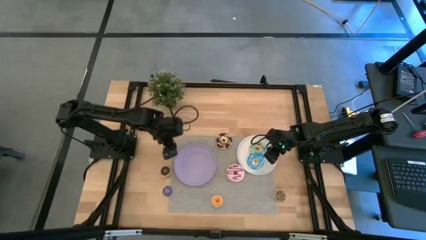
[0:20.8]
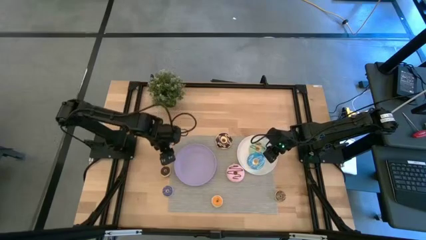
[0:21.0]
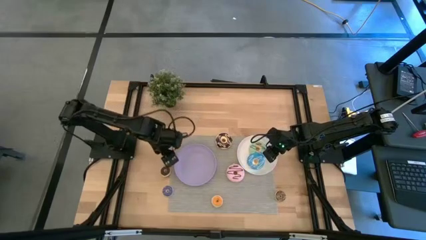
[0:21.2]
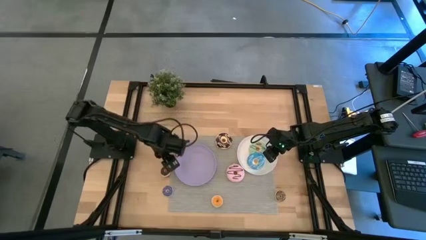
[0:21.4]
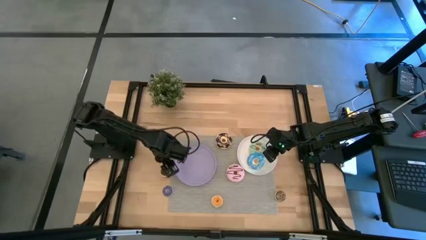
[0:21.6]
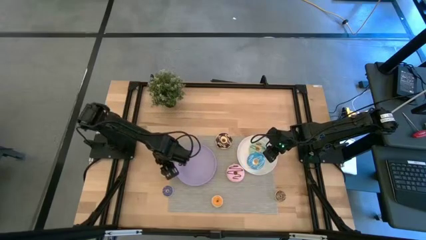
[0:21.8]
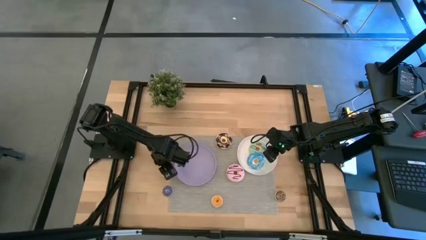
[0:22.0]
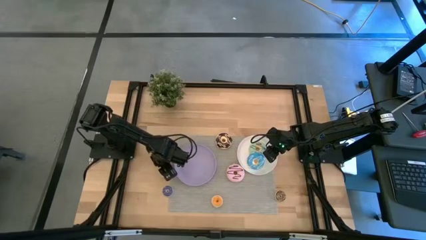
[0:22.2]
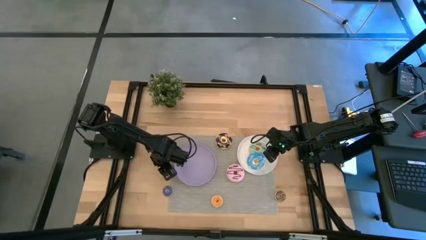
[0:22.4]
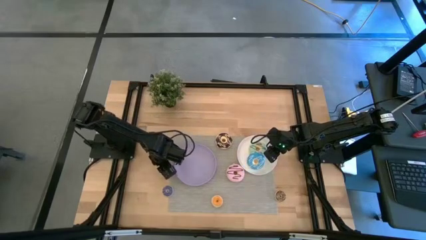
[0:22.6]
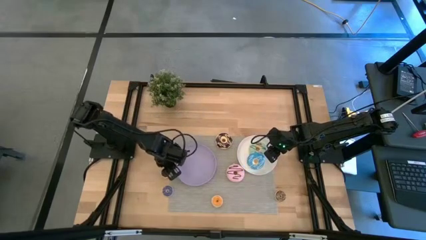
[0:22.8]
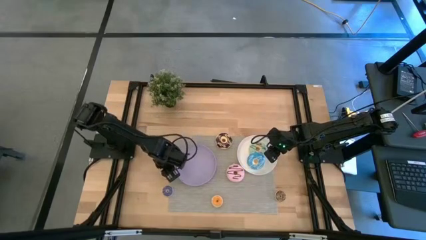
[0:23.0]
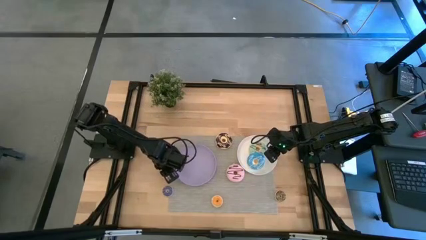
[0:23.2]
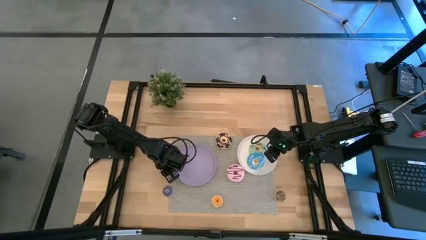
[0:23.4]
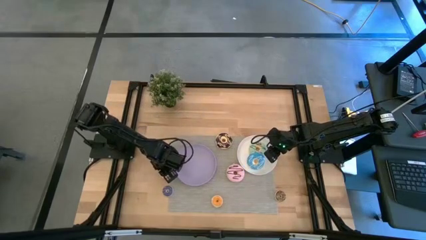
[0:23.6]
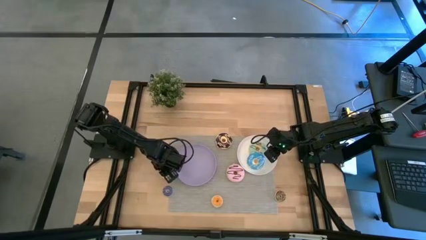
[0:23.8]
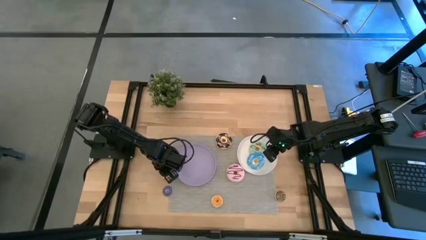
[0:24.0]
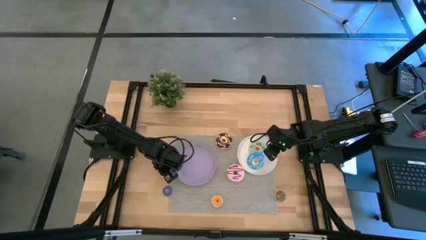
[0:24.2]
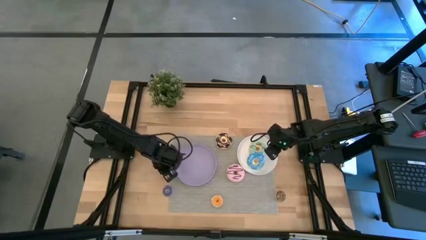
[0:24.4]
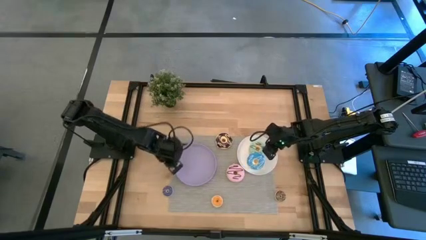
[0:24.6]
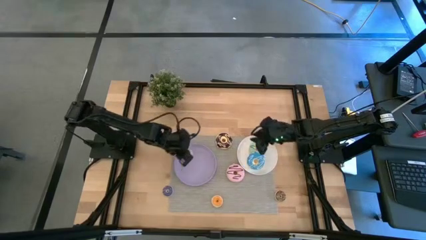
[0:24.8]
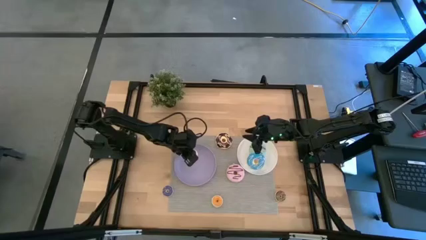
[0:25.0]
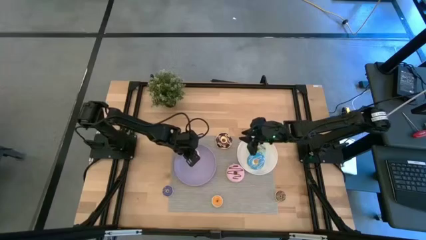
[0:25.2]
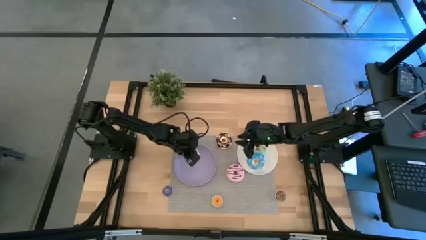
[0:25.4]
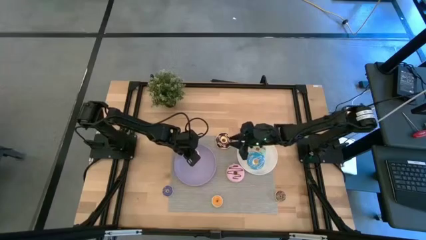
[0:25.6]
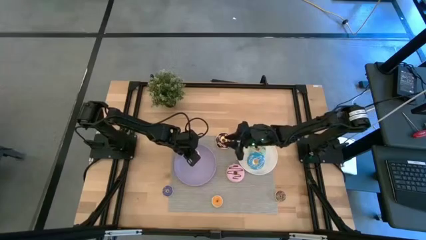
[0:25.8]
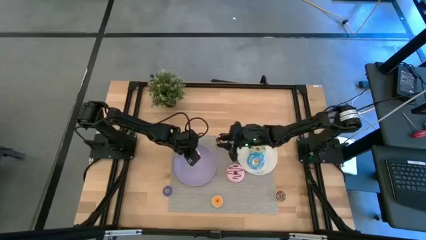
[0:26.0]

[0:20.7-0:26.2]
Task: Pick & Place donuts
Put the small dark brown donut on the purple plate

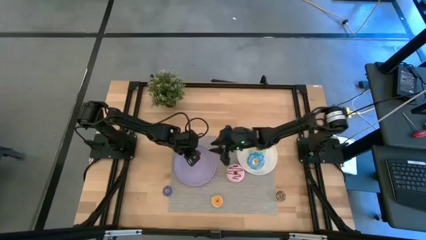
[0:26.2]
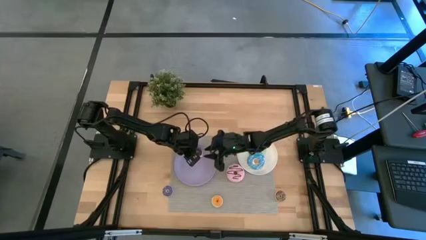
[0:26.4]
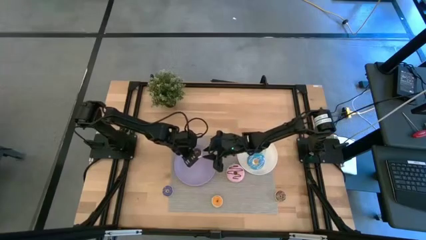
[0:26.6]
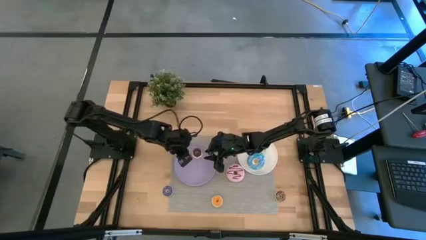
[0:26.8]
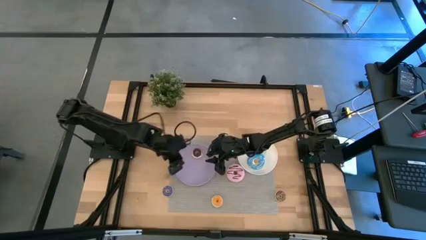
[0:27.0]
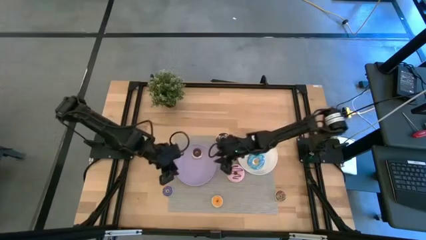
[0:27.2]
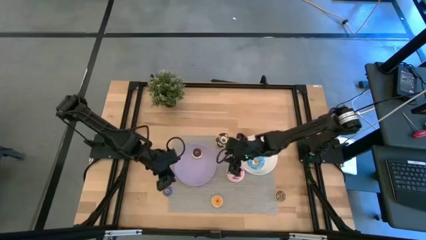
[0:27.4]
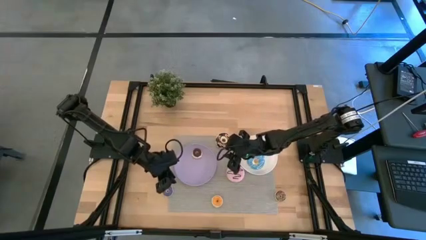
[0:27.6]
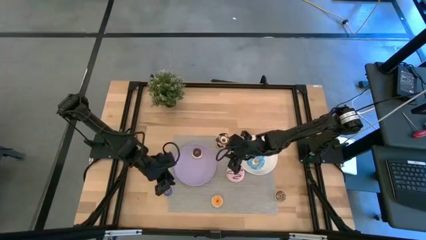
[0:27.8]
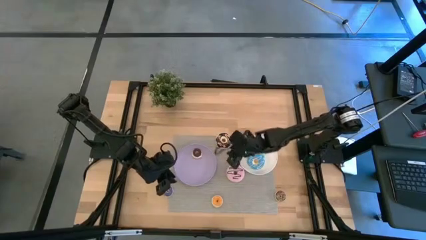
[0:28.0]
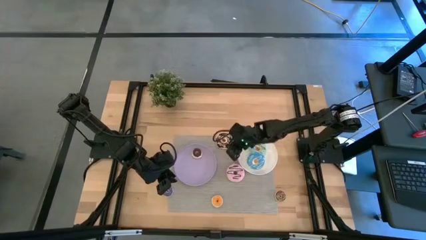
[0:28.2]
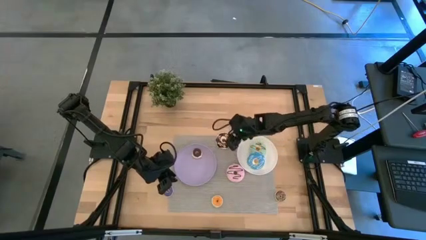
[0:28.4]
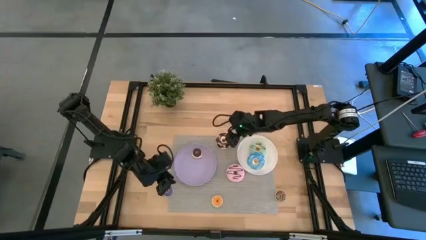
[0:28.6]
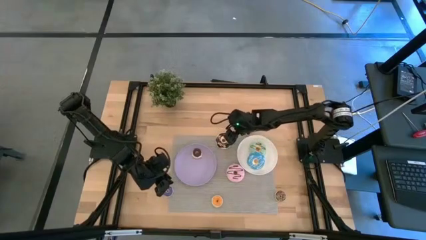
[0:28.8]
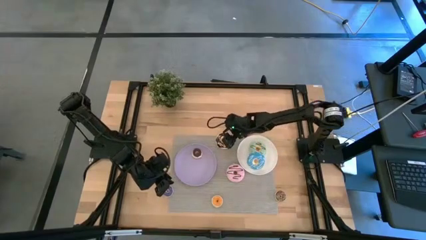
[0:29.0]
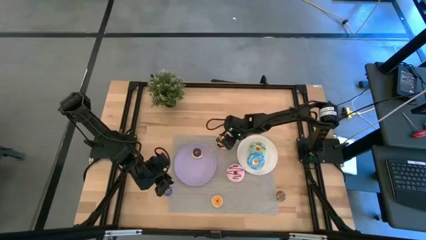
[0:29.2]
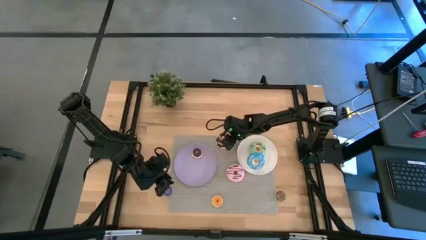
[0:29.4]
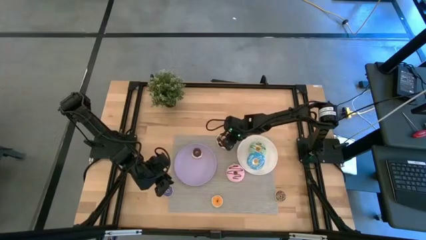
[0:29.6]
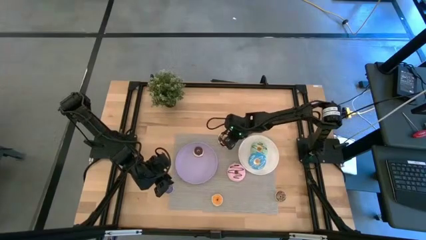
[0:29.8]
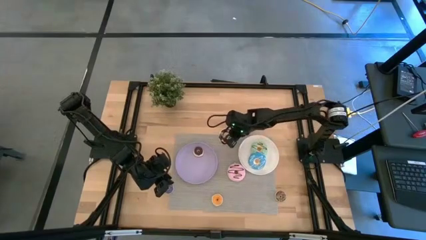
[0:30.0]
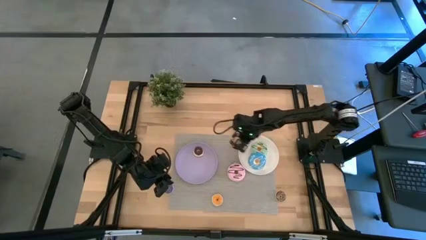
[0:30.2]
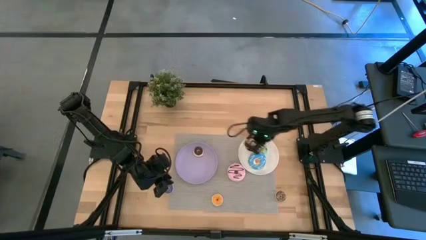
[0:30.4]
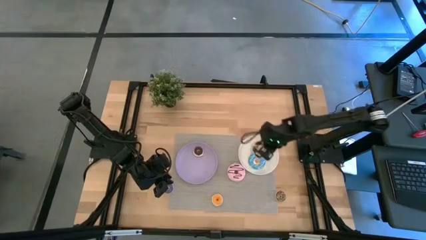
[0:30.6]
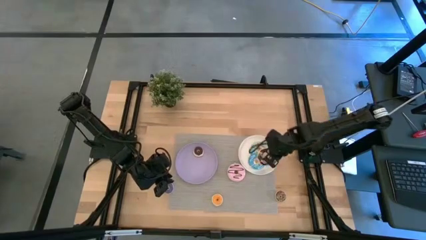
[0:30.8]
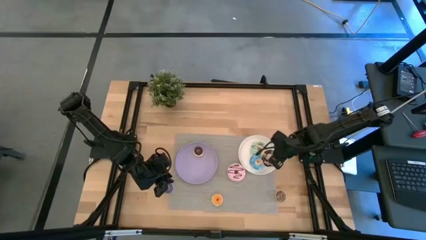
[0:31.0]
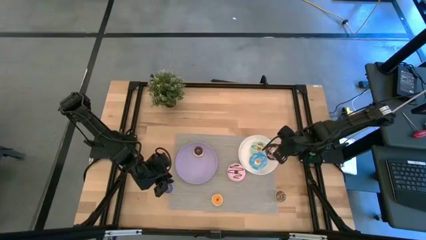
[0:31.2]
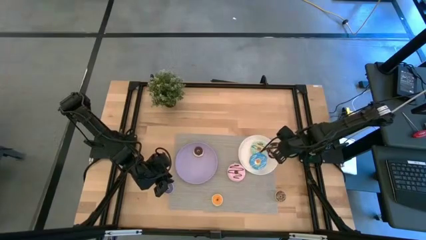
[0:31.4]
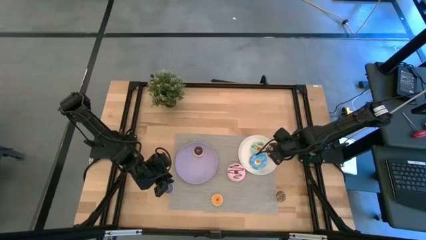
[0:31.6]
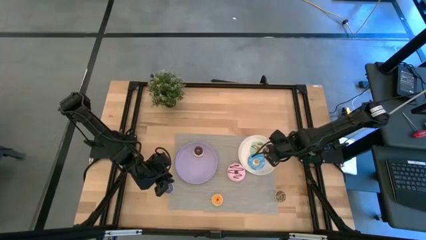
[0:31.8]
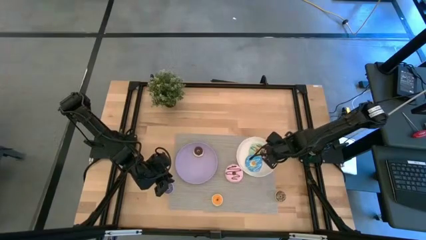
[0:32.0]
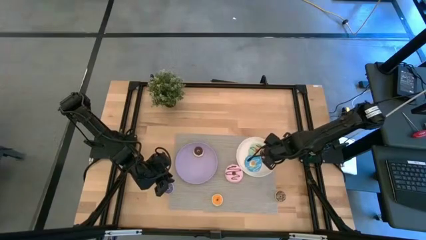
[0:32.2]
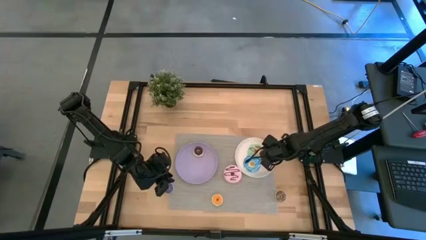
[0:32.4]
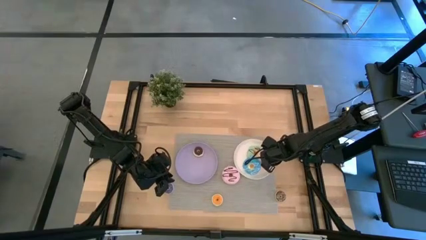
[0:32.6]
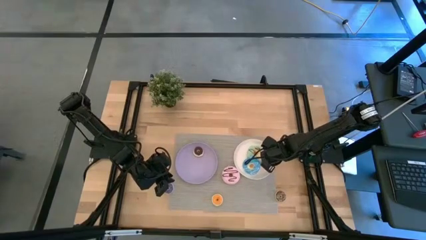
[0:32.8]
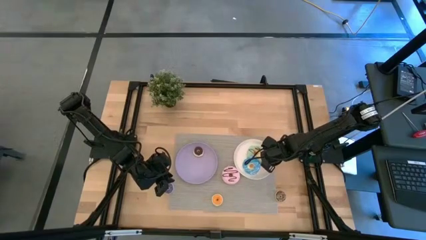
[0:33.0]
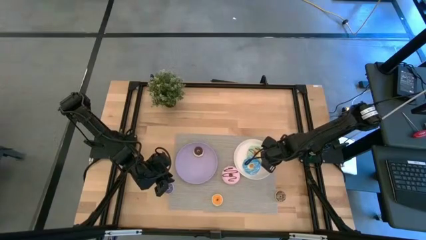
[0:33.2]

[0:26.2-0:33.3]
Put the large black donut on the white plate

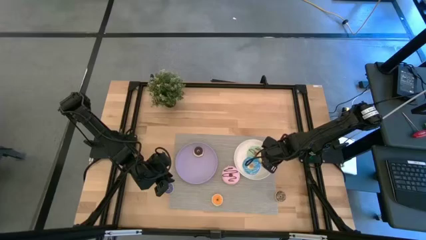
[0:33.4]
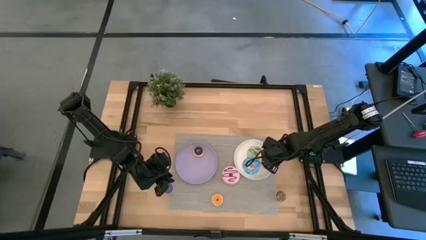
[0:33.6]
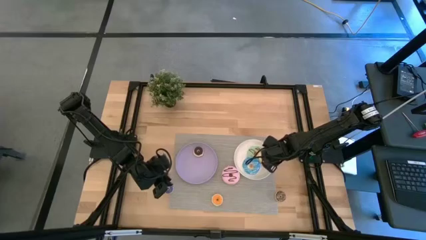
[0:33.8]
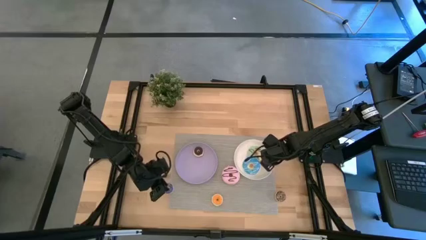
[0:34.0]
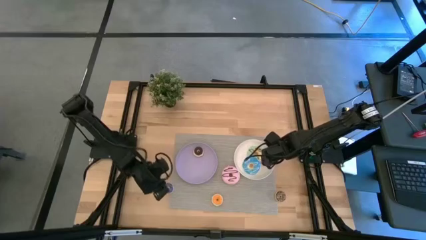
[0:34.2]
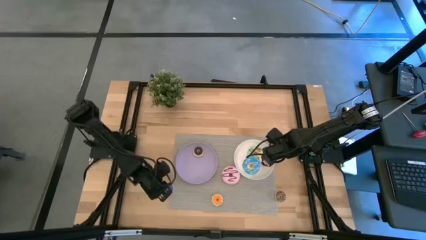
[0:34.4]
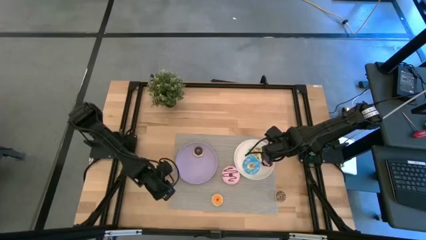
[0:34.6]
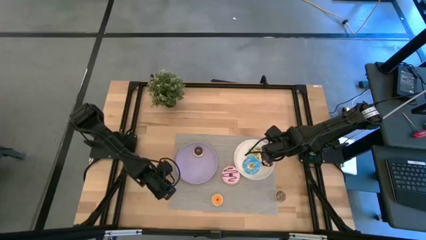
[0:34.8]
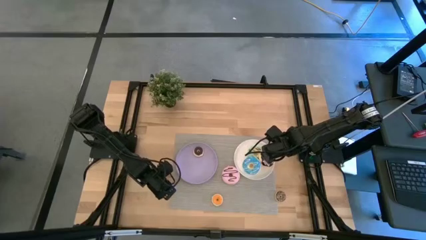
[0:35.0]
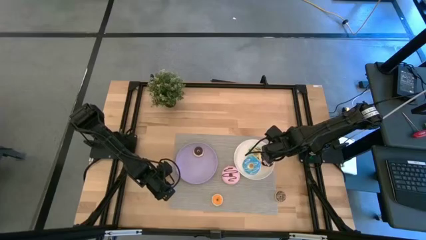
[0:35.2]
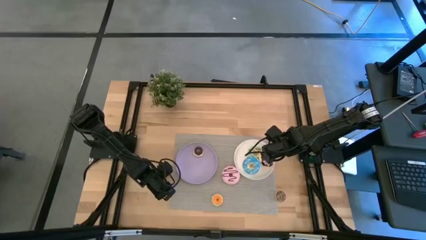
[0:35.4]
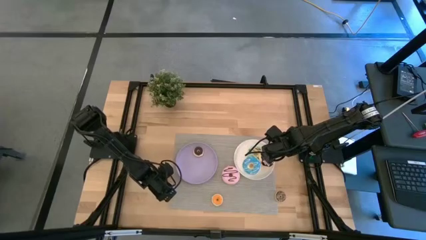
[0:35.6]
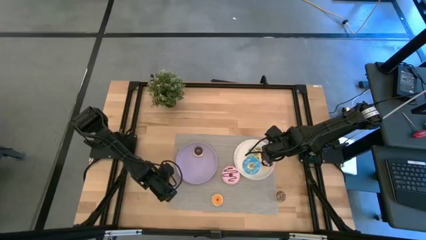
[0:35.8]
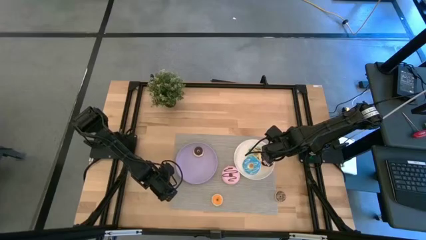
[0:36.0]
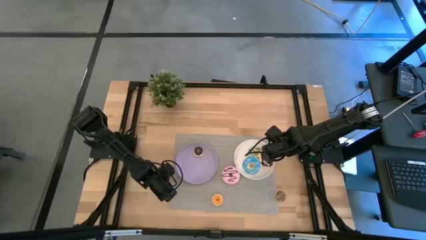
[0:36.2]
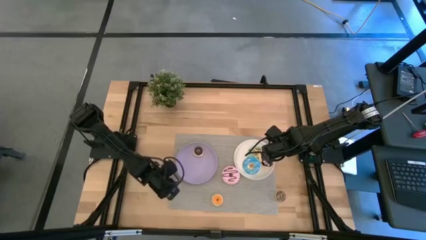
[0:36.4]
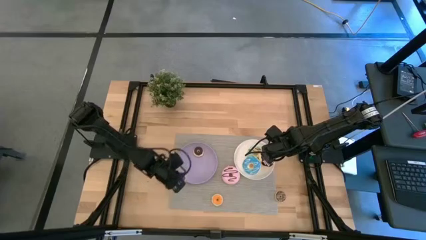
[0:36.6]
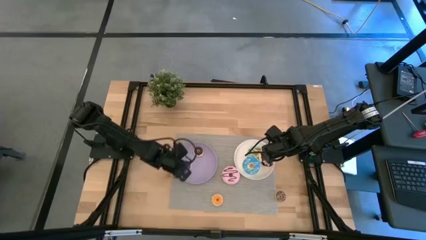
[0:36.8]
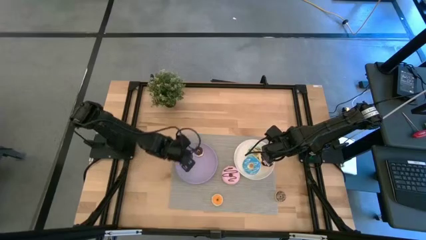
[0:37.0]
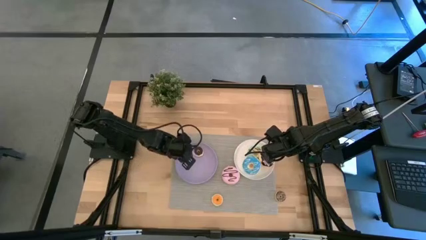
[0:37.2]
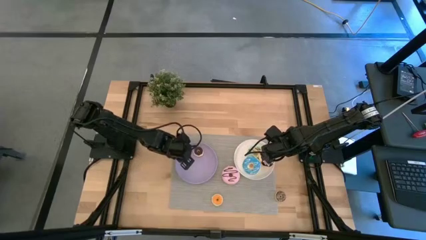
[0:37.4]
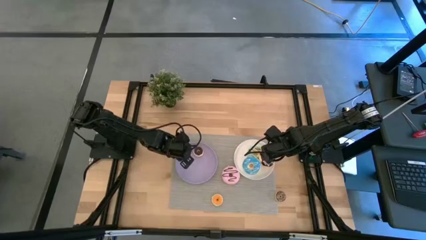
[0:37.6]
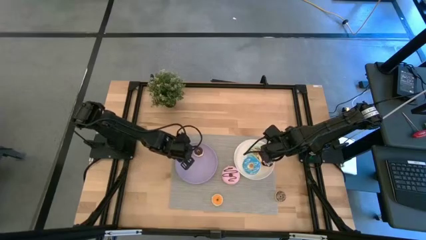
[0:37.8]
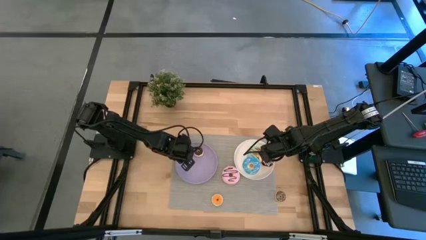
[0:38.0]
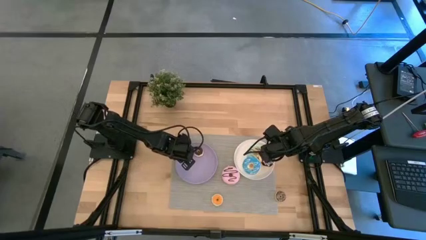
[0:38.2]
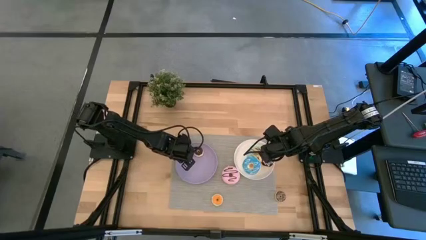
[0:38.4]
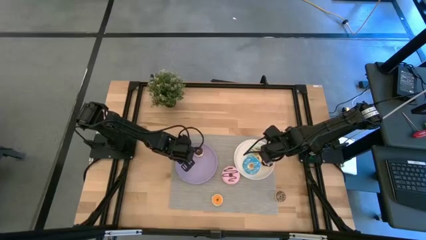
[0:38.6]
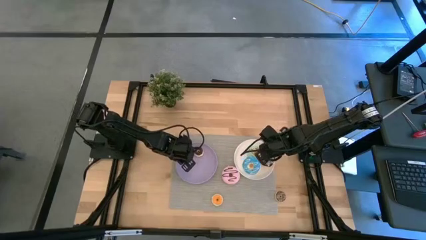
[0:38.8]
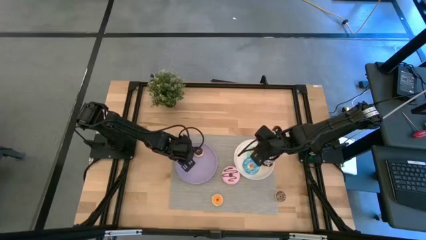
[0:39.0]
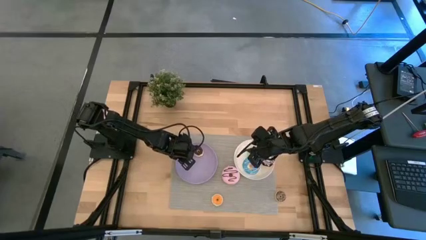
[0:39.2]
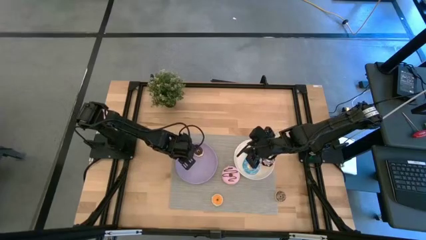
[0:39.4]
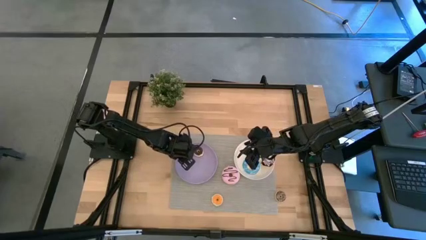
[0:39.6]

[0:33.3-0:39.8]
Put the small violet donut on the purple plate
